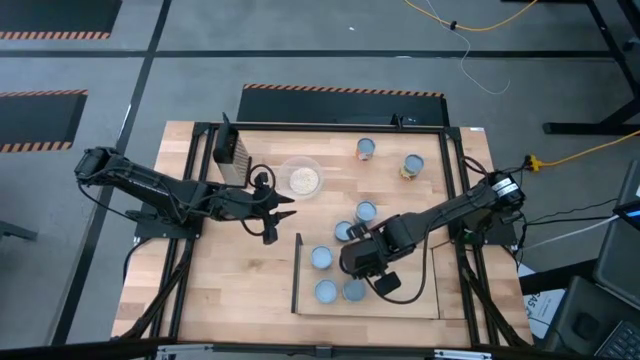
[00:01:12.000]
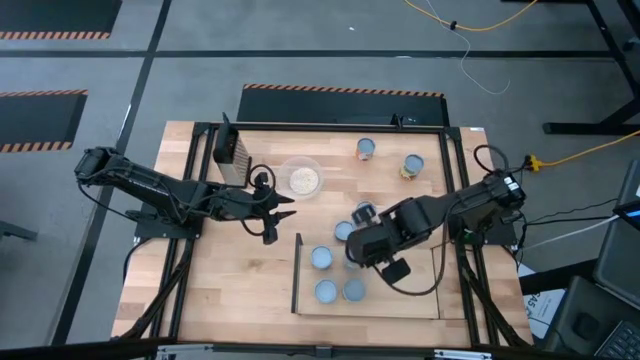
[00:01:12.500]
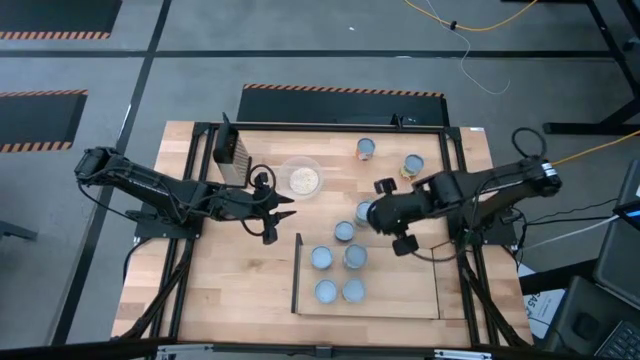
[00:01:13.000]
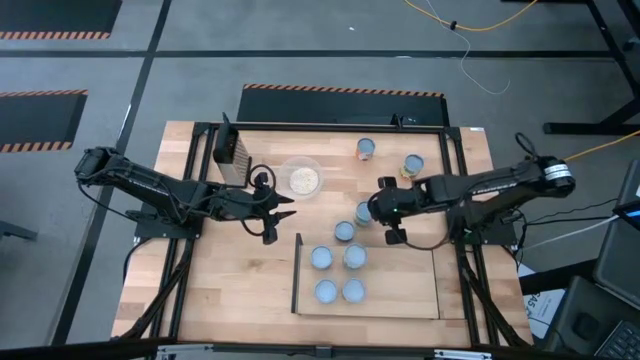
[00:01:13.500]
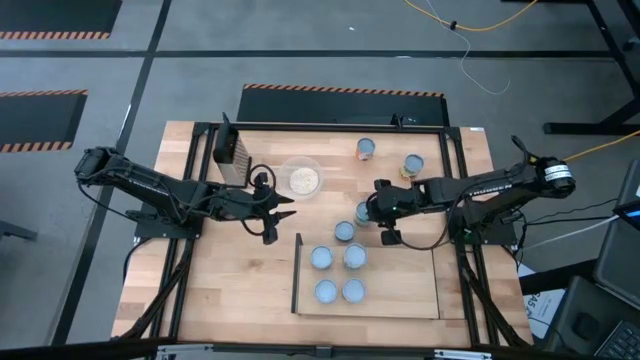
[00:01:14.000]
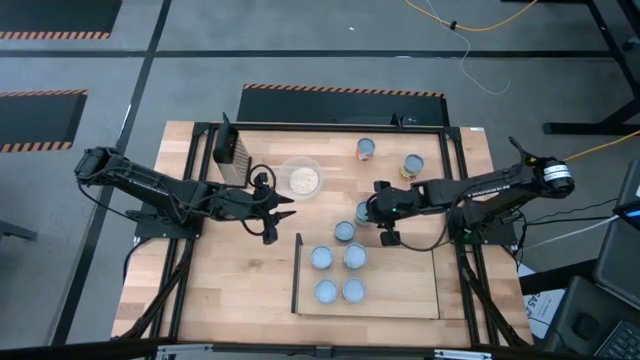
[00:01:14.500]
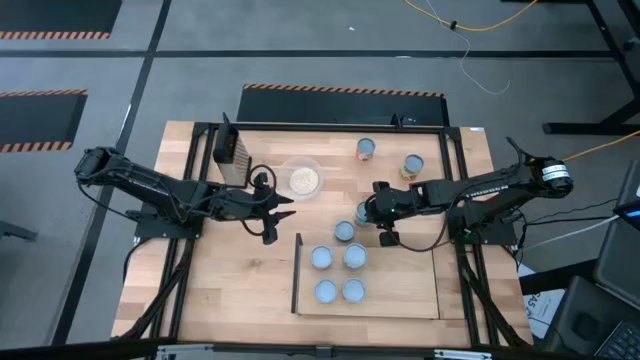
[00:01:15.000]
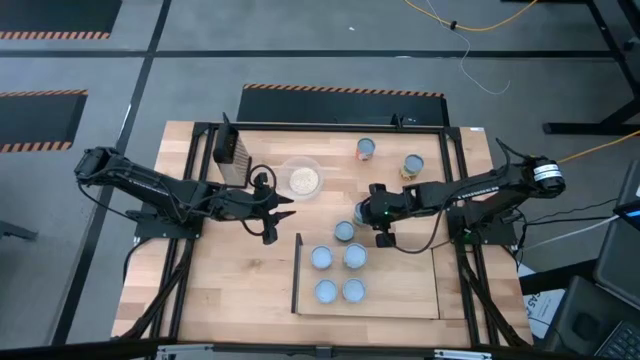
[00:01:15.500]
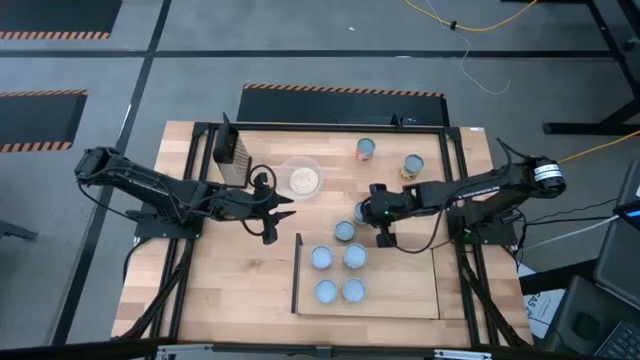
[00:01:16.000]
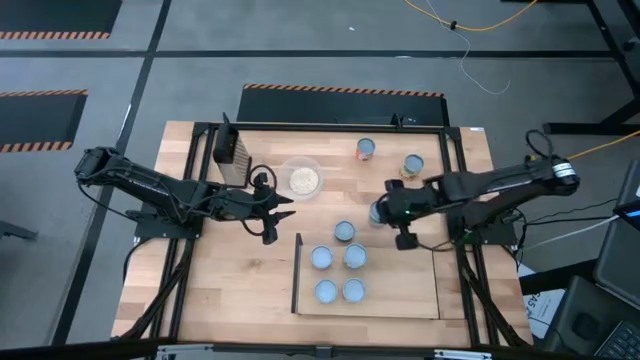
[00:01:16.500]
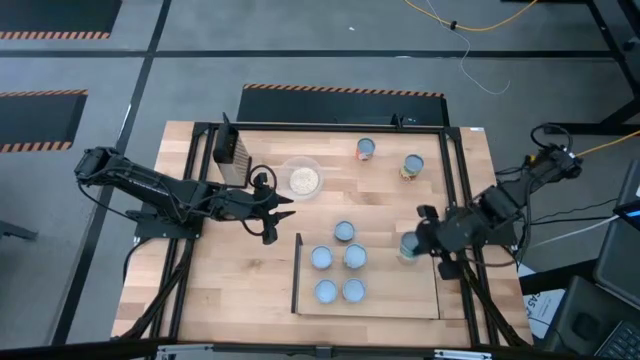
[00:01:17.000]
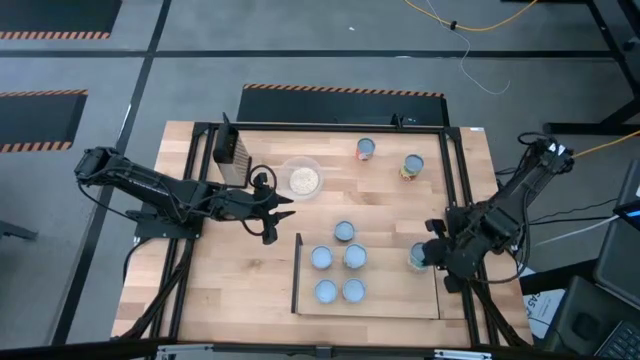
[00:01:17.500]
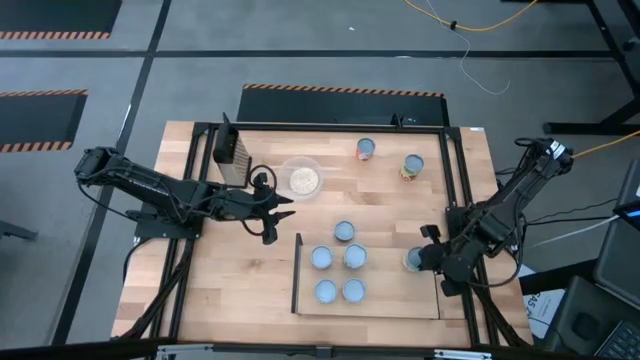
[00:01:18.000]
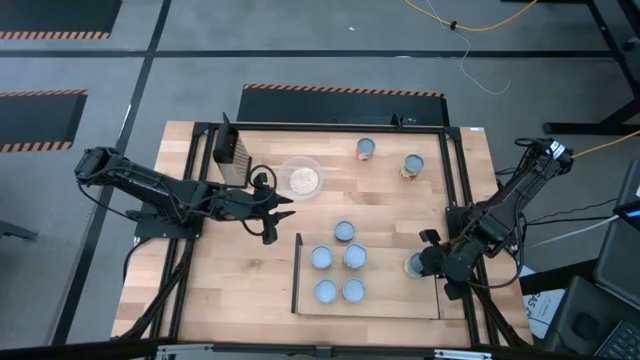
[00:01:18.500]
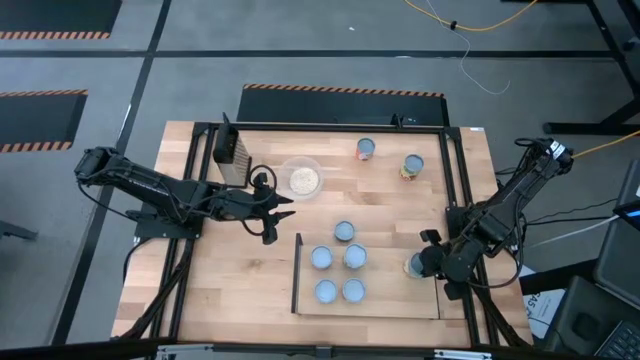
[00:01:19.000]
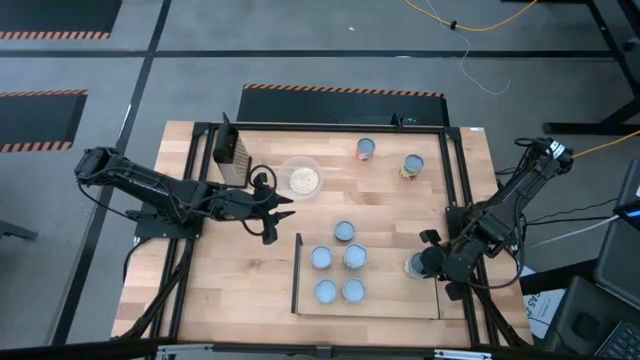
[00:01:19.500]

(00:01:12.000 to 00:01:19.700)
Task: Pick and place cans onto a shelf
Put the canned chicken soup on the shelf

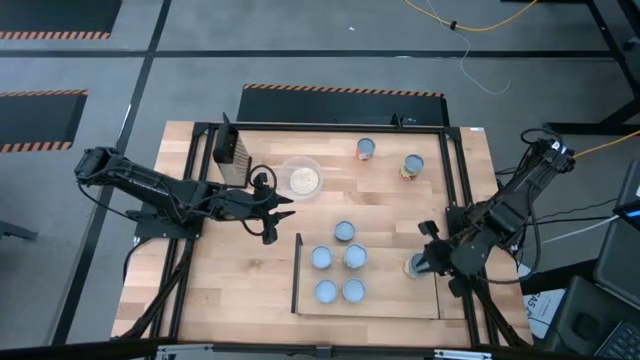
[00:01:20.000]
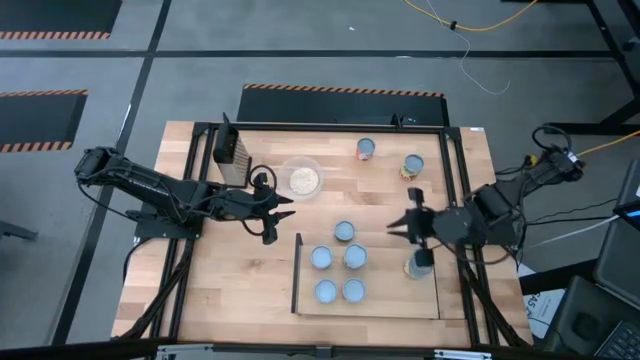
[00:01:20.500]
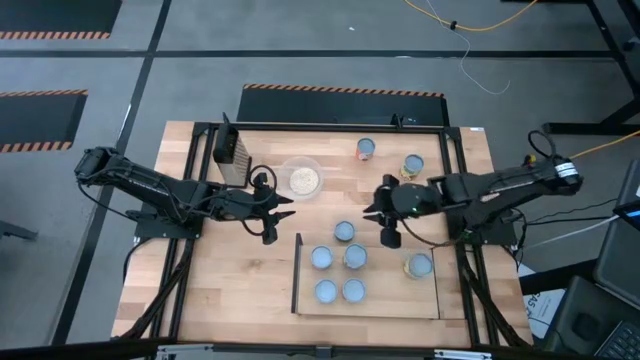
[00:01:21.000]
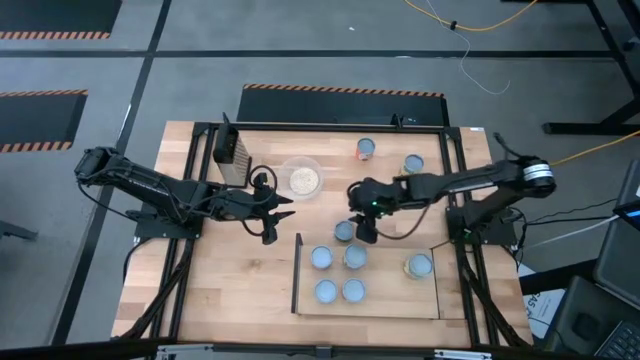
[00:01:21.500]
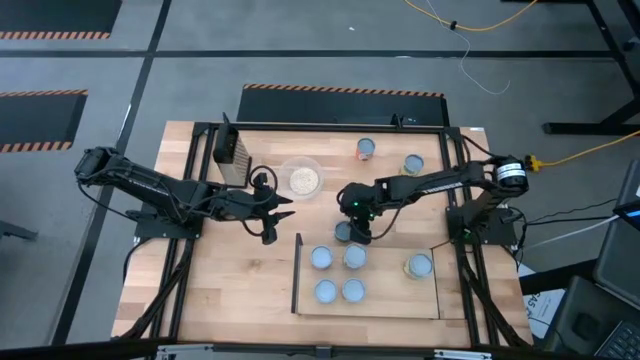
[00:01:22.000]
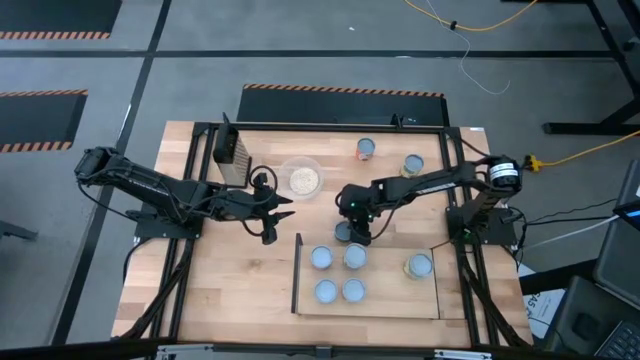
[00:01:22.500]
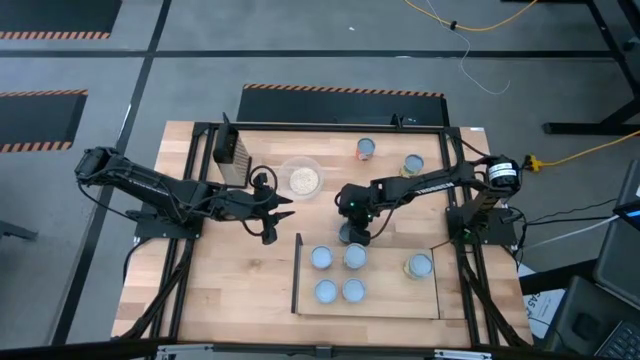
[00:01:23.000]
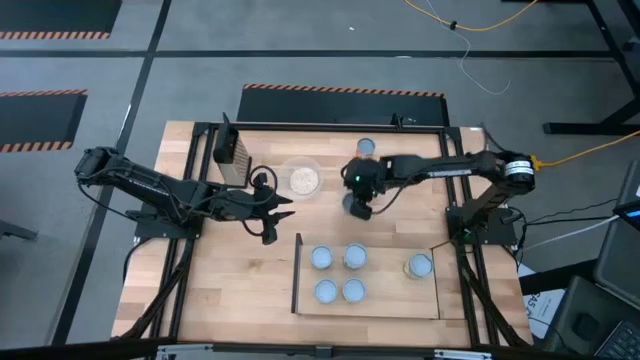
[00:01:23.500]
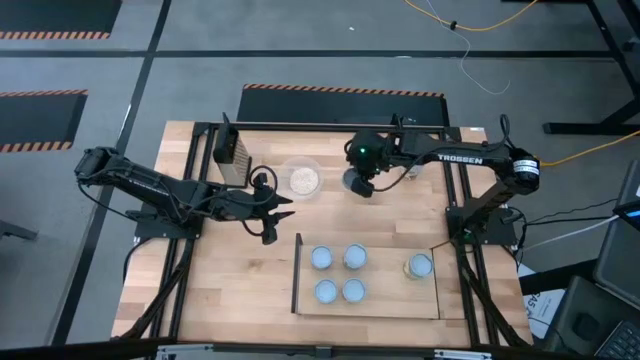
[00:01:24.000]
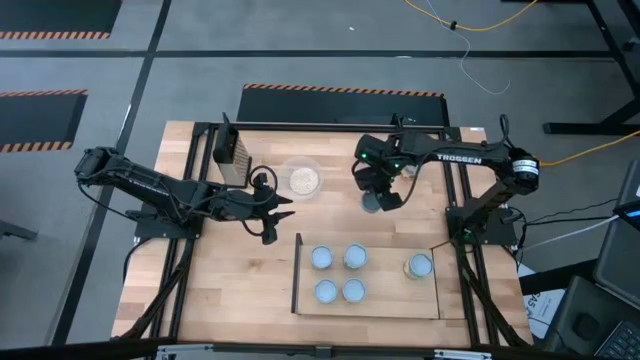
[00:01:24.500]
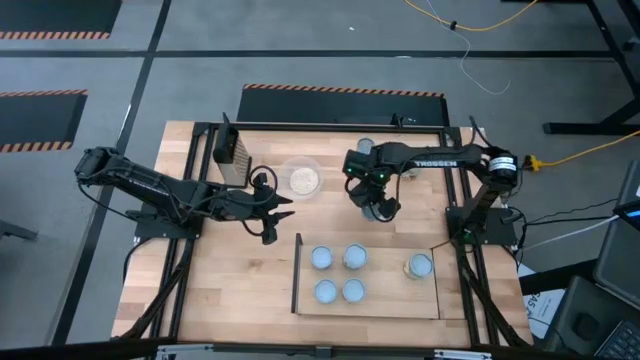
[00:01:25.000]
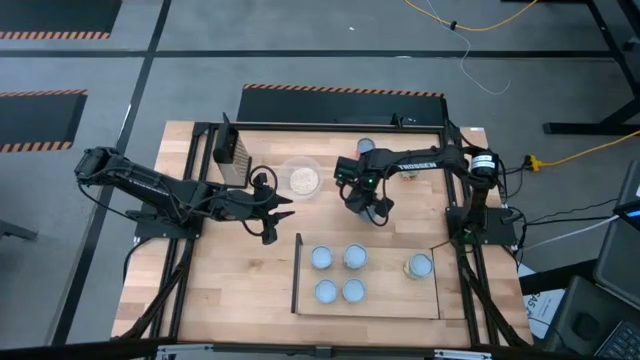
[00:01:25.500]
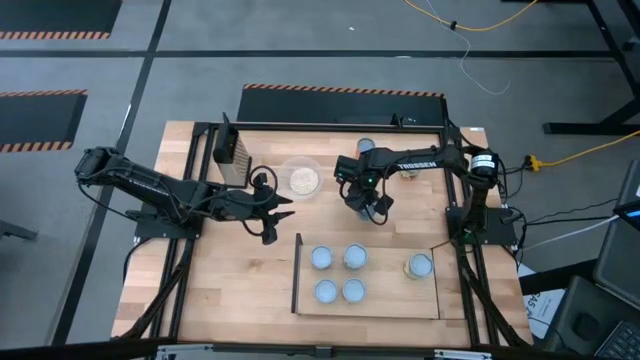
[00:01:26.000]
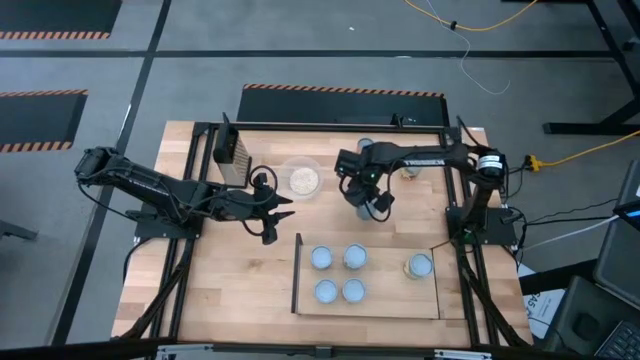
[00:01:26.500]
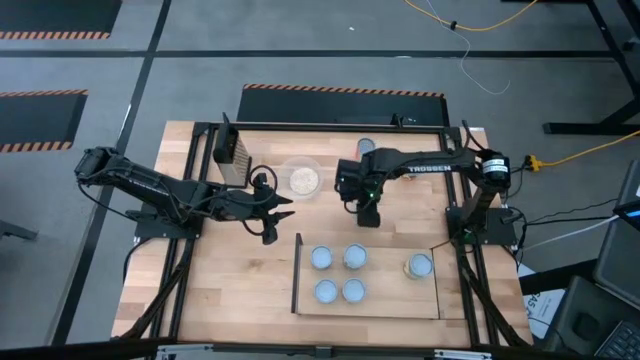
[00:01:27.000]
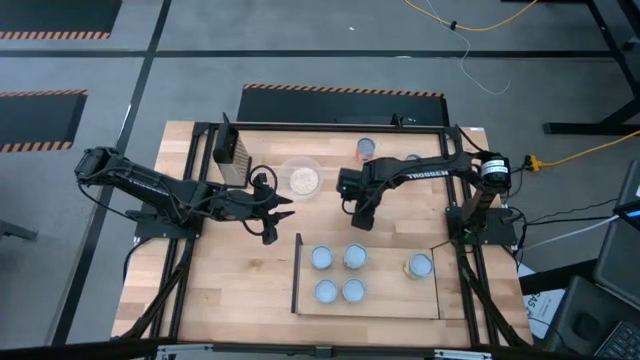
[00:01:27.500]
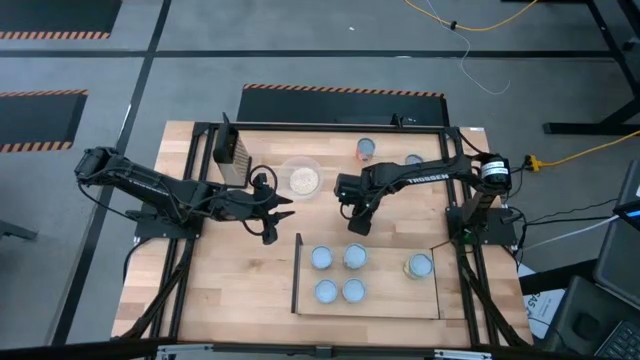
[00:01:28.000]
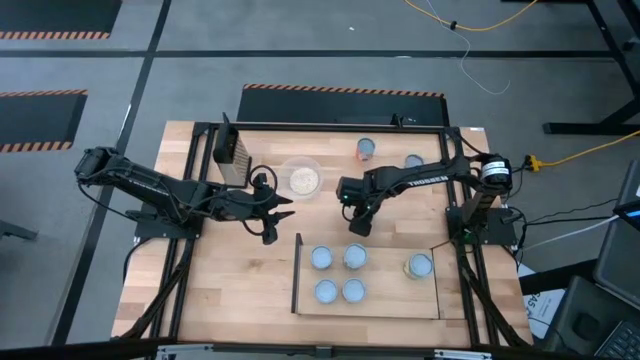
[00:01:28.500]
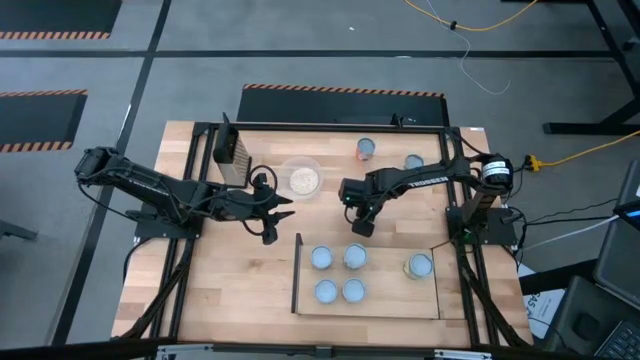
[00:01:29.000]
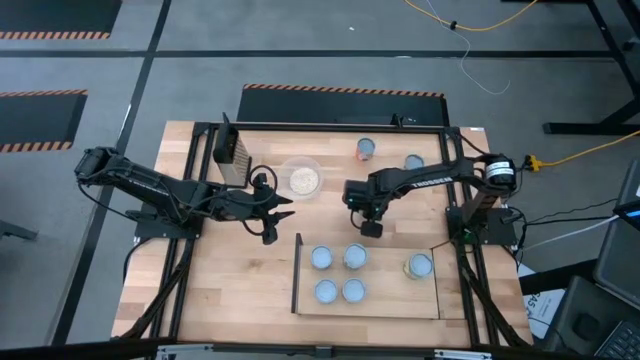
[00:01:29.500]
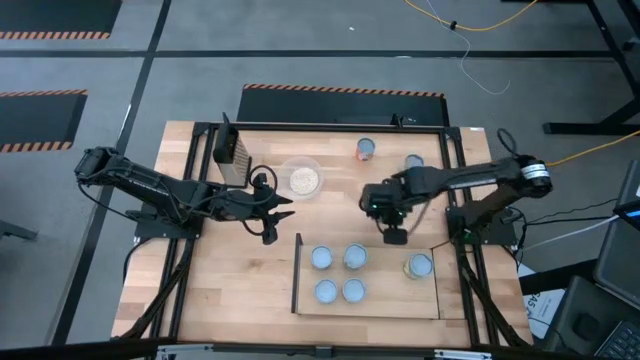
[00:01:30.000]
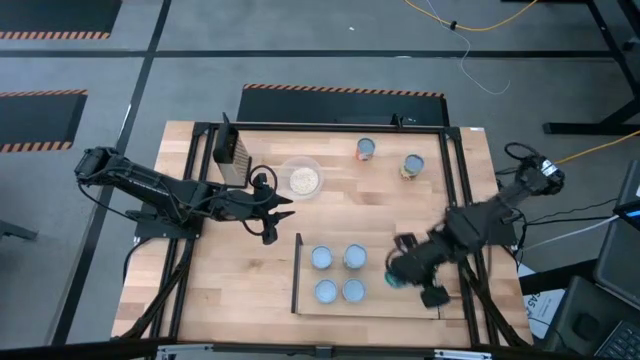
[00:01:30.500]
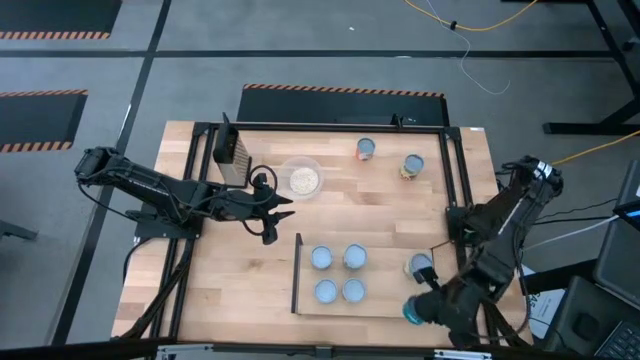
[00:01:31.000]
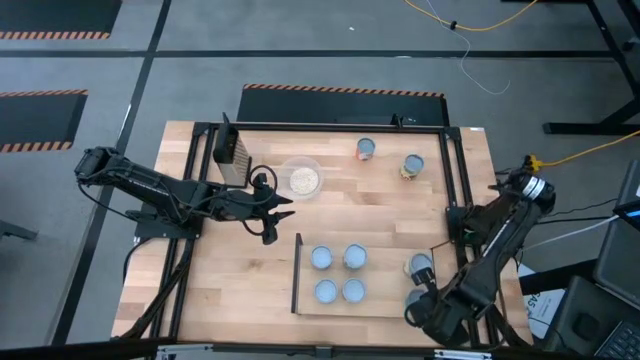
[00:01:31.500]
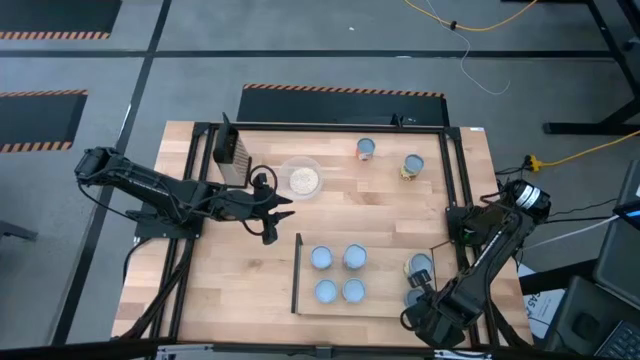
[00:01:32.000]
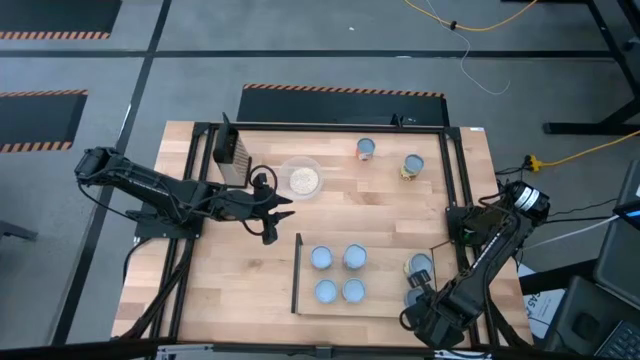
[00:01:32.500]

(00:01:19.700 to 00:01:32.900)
Put the canned tuna can on the shelf
